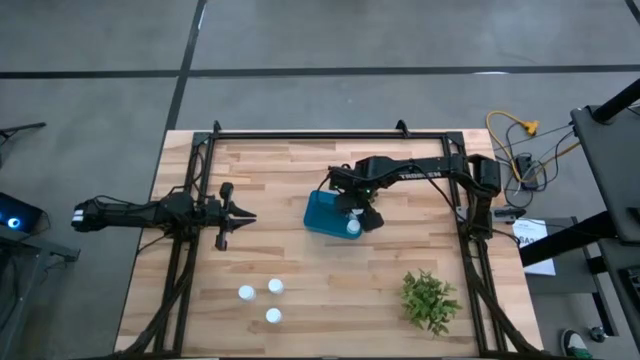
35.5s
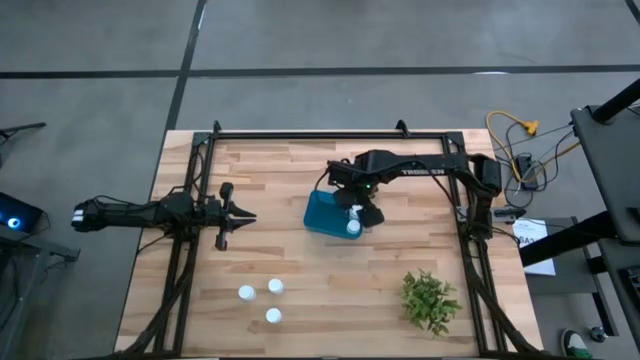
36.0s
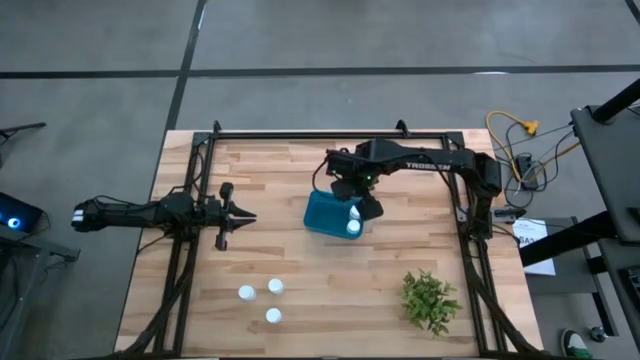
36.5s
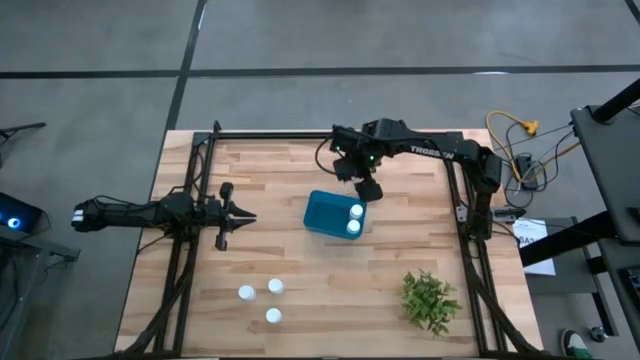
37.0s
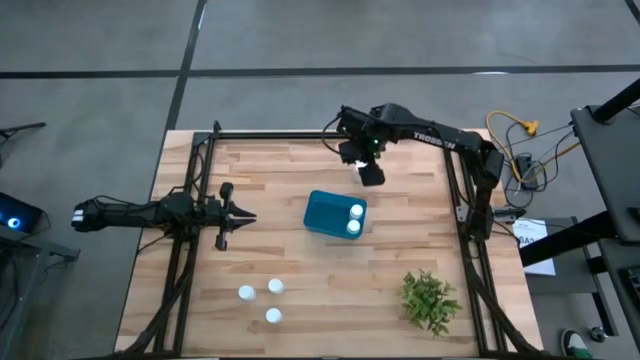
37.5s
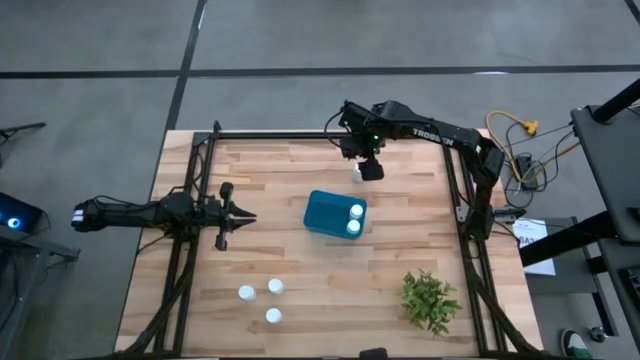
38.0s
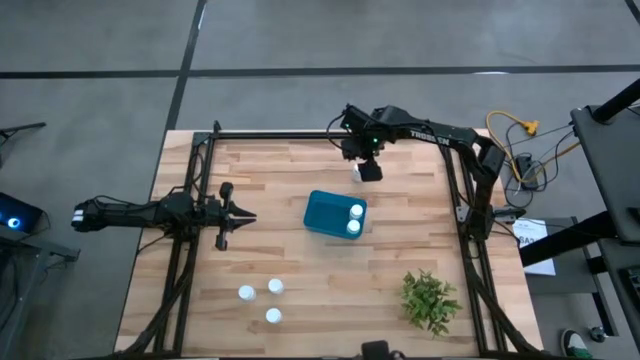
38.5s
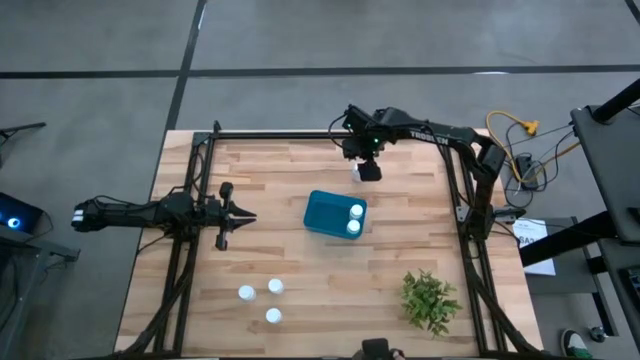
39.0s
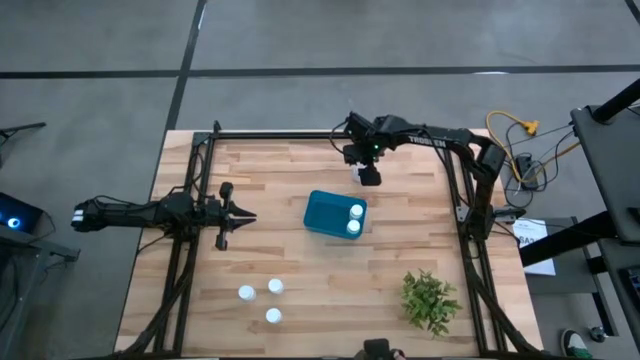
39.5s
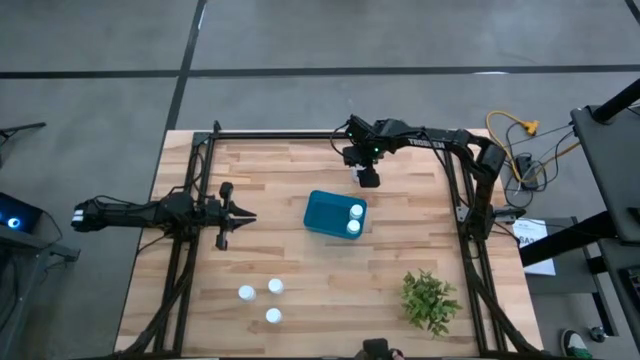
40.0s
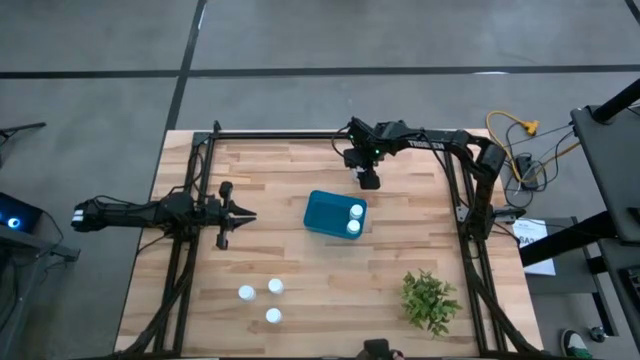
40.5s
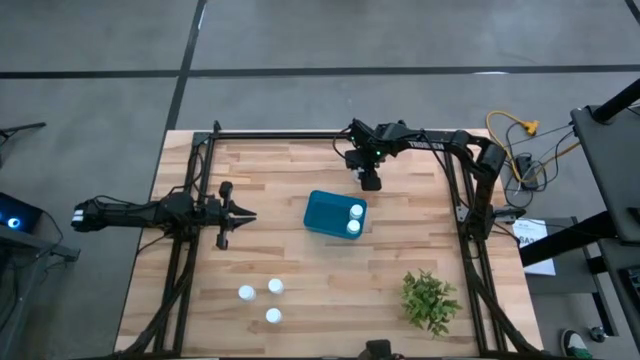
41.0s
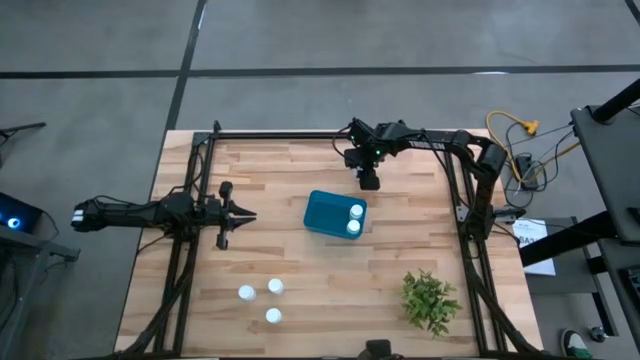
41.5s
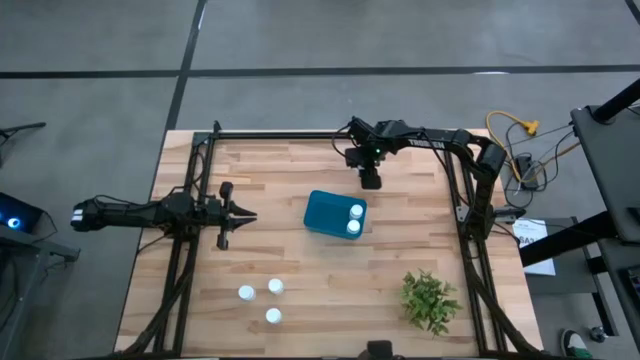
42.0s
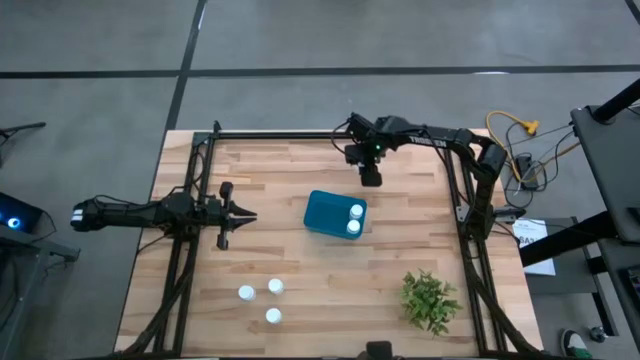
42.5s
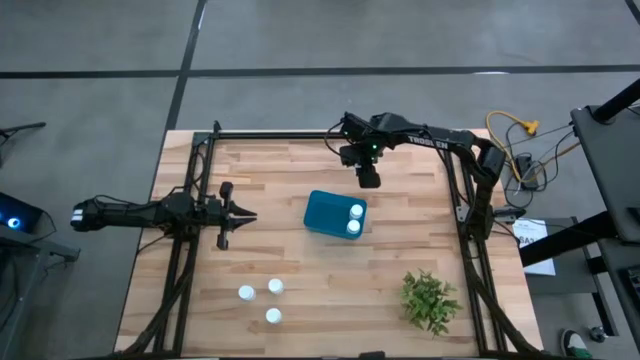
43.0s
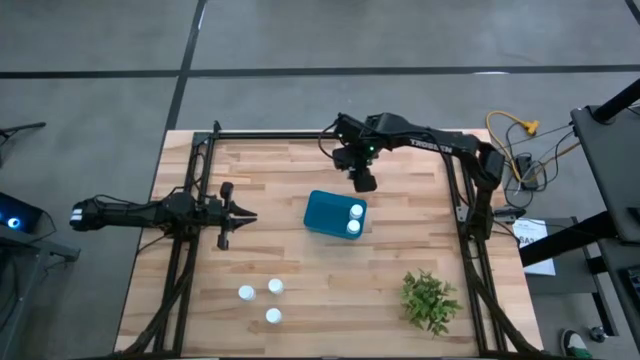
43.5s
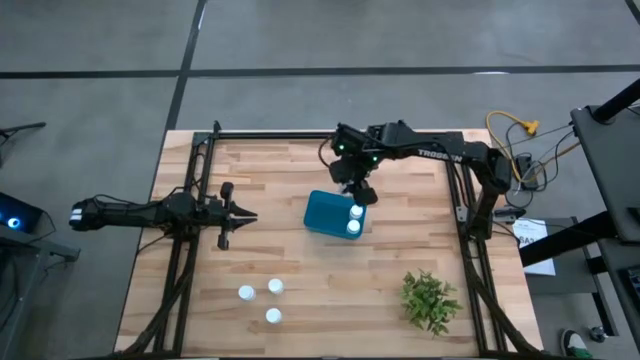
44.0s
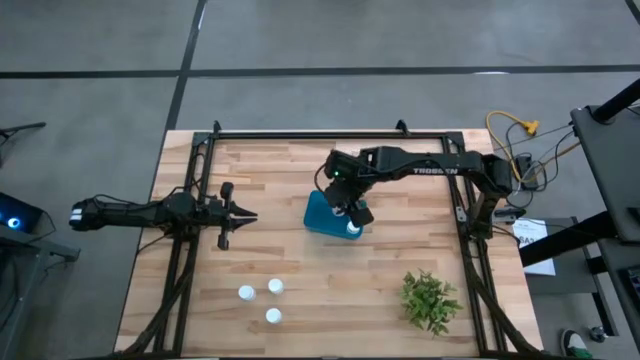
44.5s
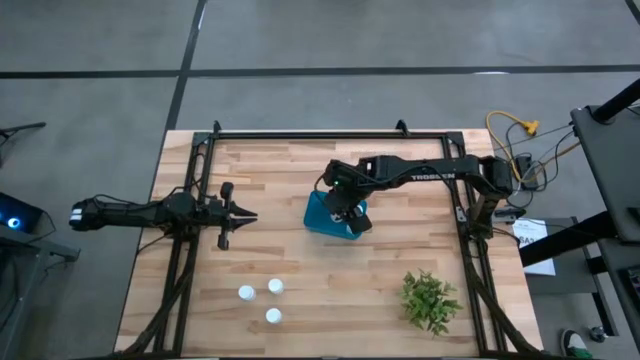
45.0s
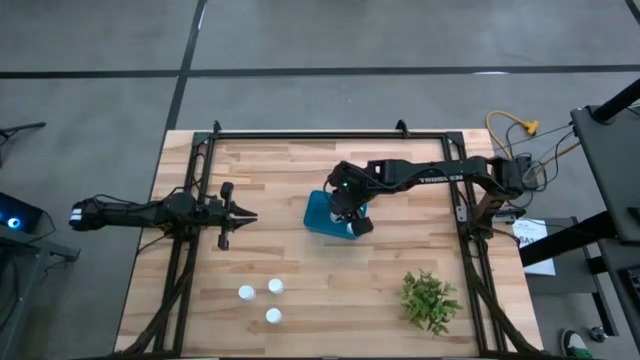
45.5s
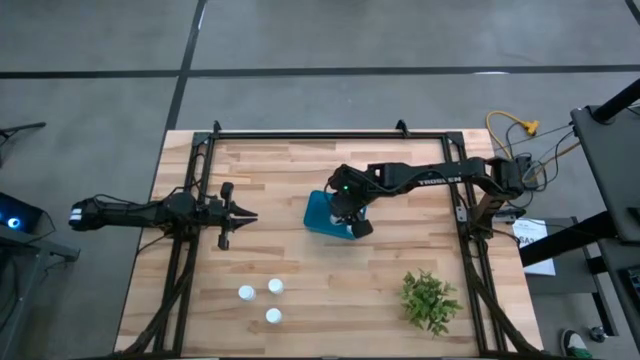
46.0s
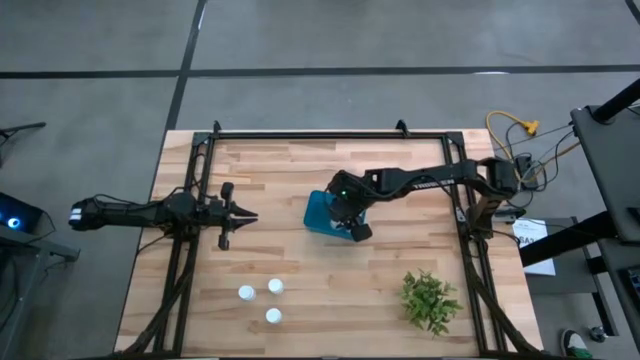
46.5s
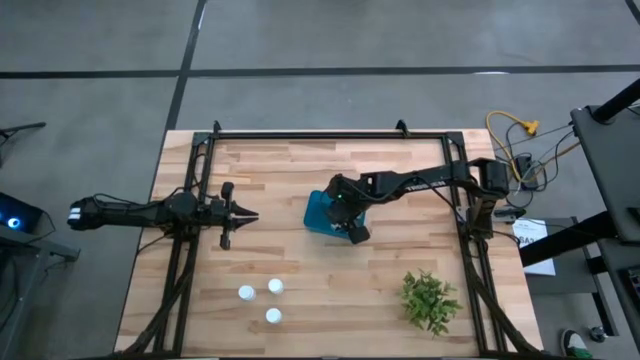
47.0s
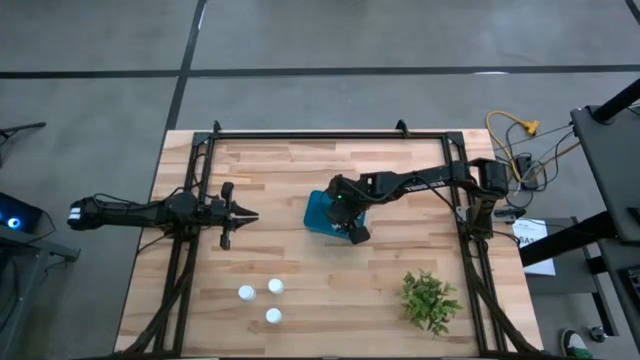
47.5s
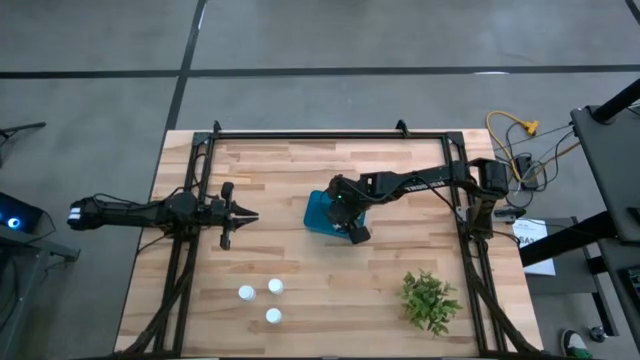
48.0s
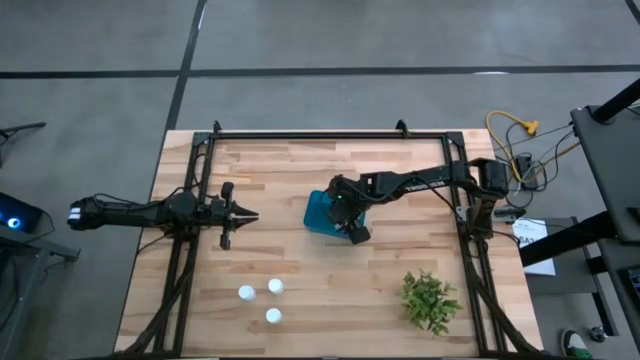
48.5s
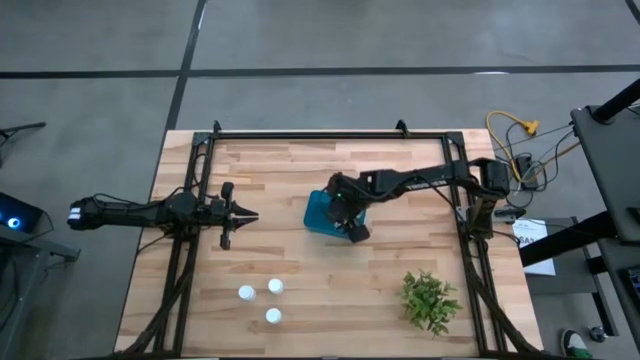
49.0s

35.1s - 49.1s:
Task: Pick and place pill bottles into a basket
Put the white pill bottle into the blue bin
